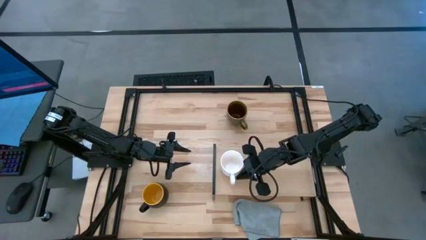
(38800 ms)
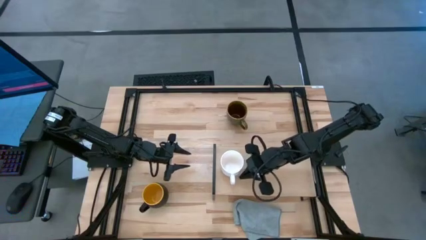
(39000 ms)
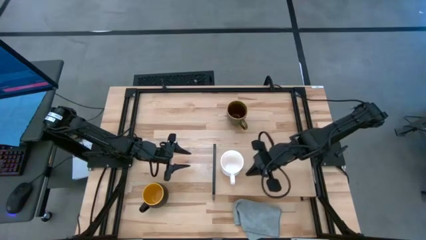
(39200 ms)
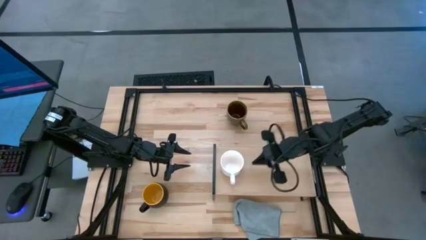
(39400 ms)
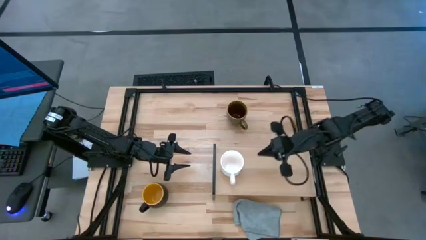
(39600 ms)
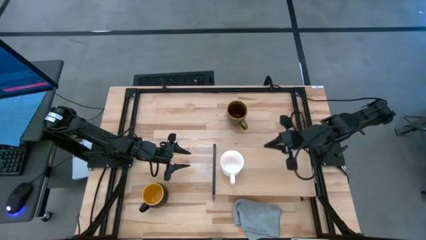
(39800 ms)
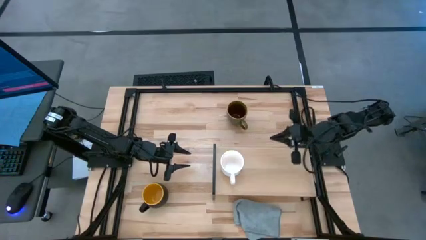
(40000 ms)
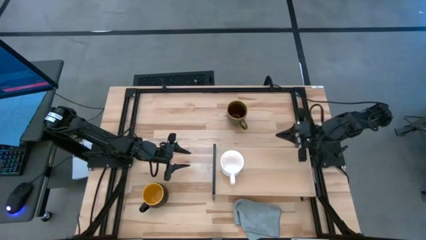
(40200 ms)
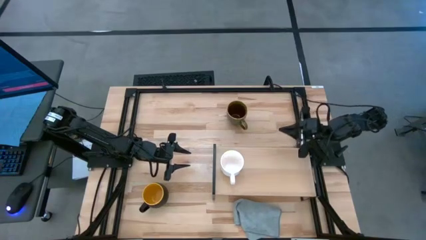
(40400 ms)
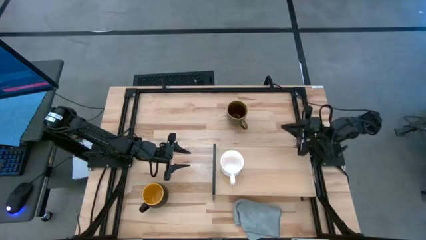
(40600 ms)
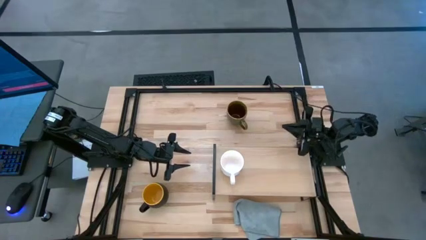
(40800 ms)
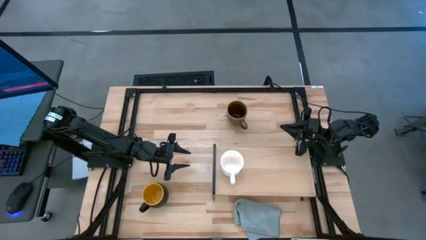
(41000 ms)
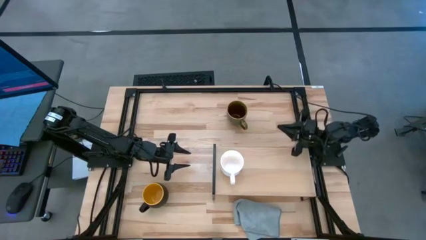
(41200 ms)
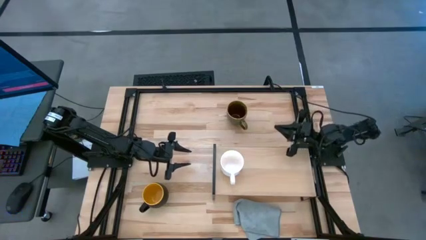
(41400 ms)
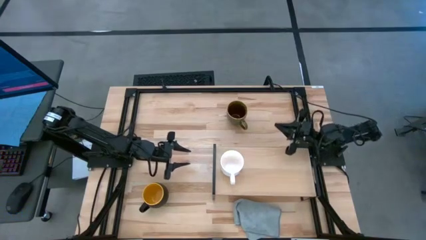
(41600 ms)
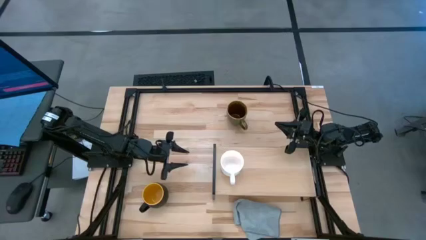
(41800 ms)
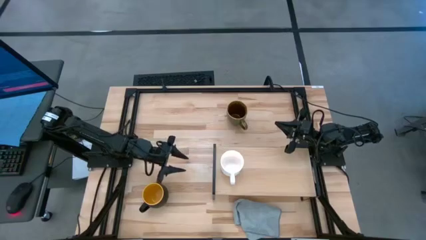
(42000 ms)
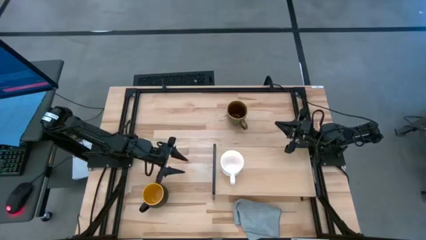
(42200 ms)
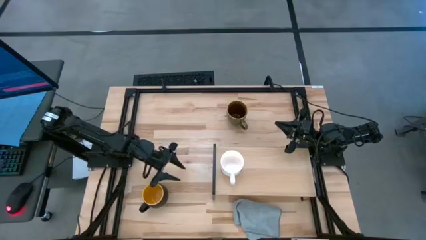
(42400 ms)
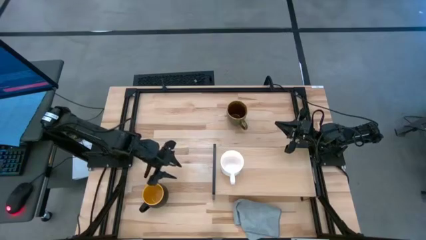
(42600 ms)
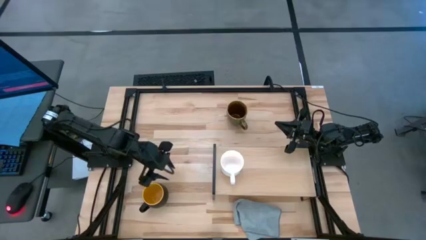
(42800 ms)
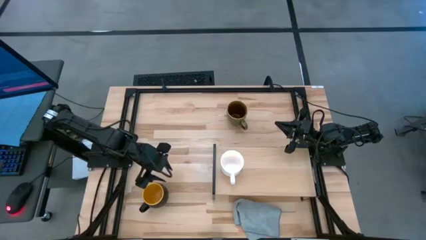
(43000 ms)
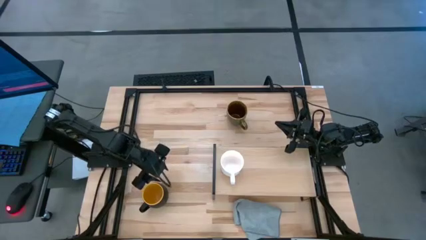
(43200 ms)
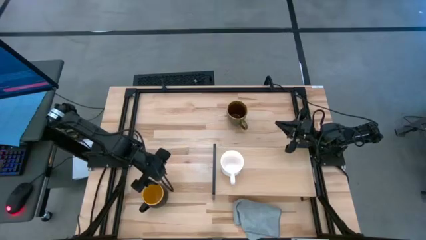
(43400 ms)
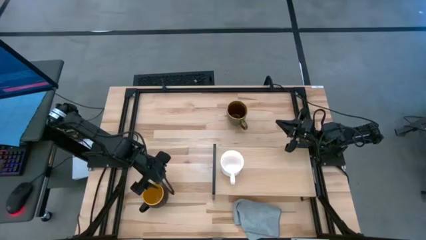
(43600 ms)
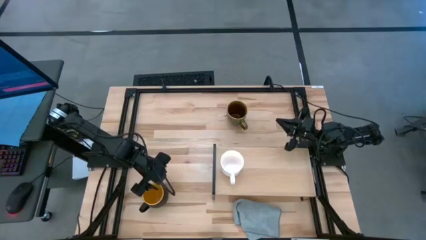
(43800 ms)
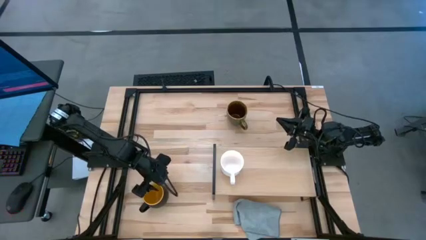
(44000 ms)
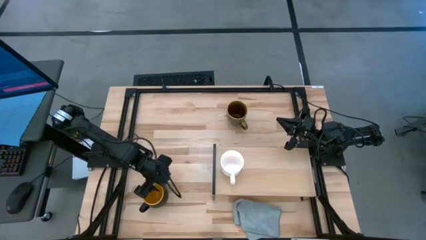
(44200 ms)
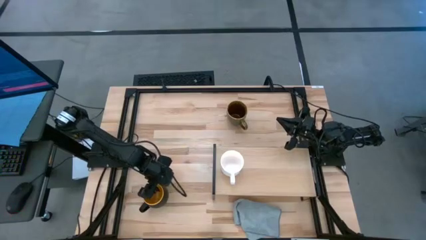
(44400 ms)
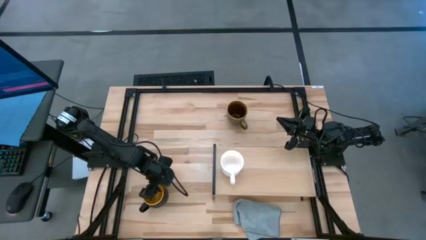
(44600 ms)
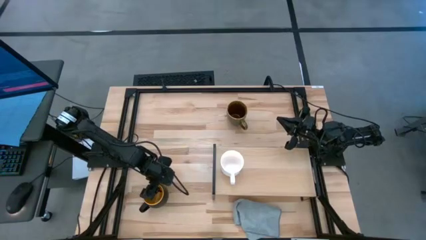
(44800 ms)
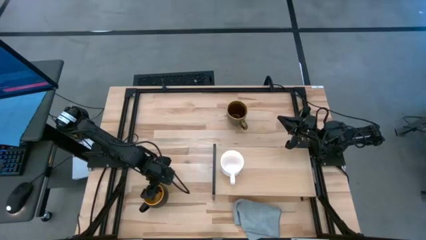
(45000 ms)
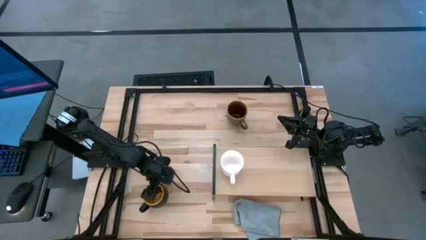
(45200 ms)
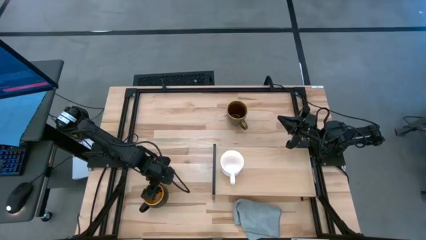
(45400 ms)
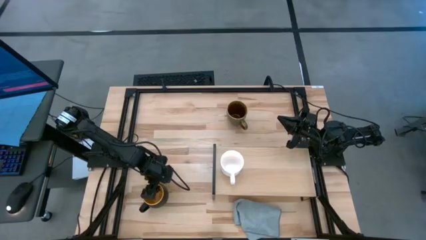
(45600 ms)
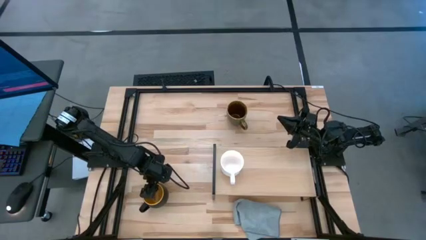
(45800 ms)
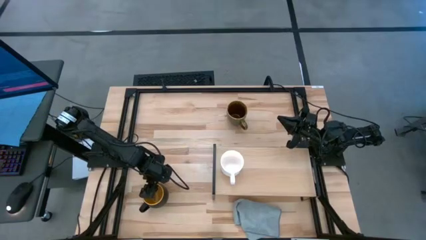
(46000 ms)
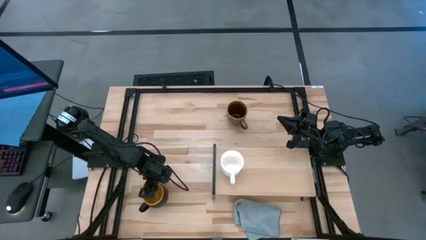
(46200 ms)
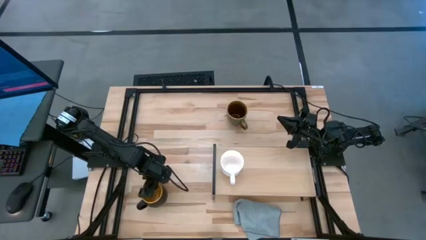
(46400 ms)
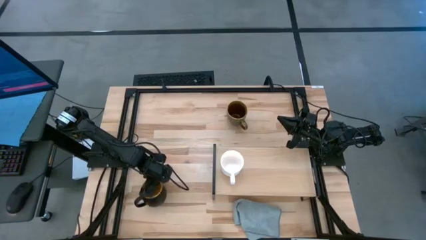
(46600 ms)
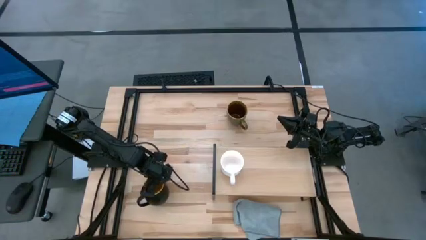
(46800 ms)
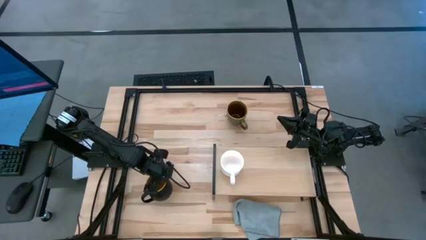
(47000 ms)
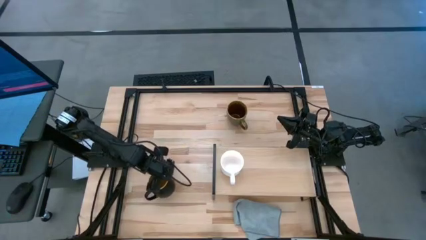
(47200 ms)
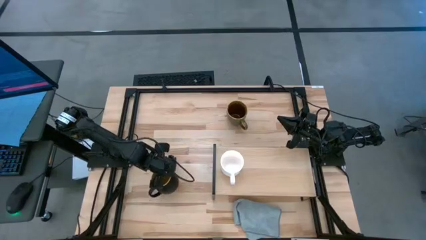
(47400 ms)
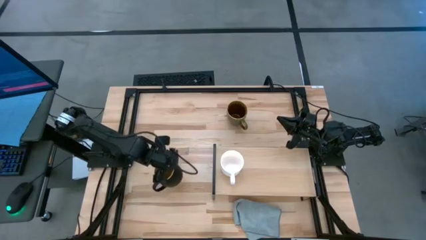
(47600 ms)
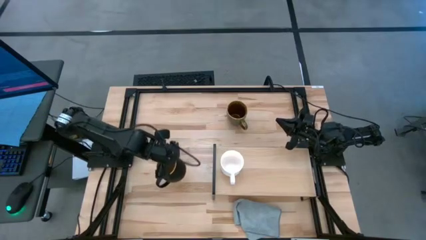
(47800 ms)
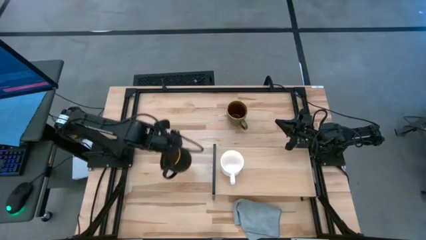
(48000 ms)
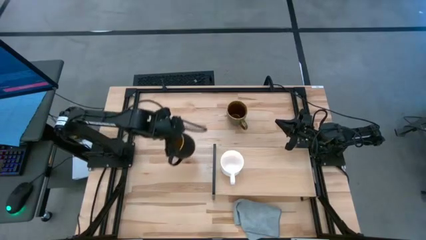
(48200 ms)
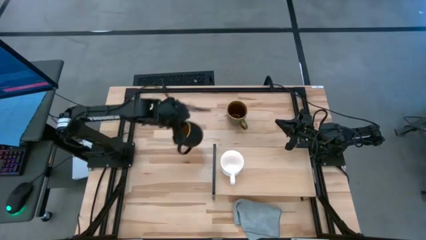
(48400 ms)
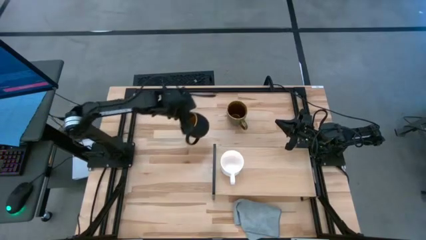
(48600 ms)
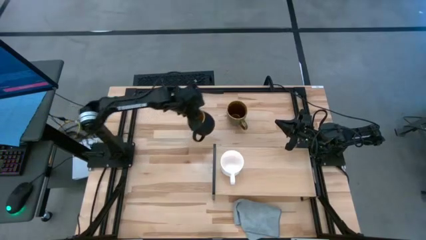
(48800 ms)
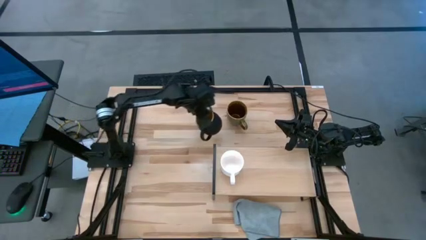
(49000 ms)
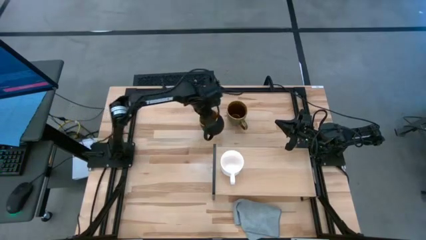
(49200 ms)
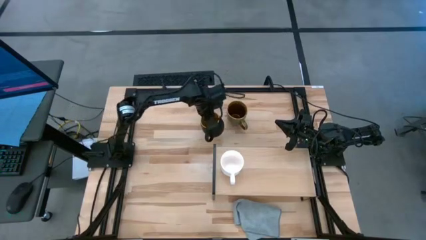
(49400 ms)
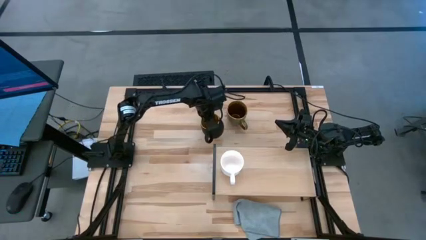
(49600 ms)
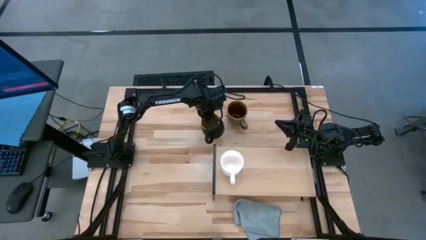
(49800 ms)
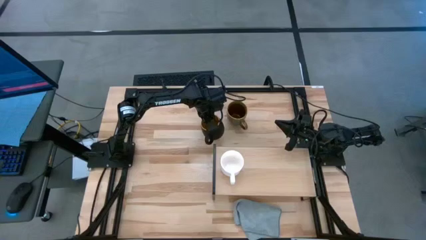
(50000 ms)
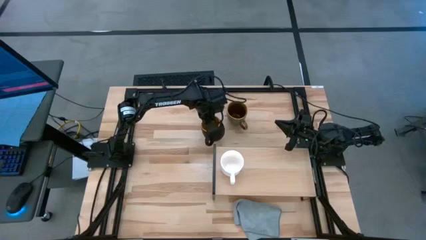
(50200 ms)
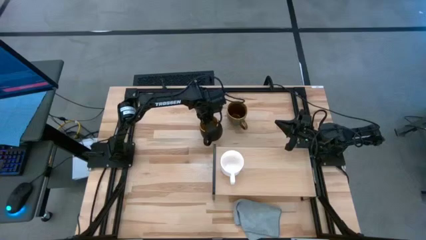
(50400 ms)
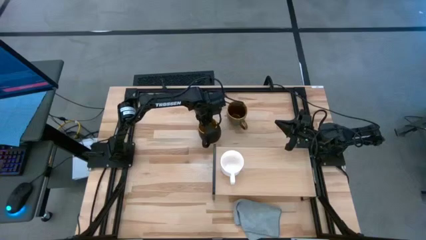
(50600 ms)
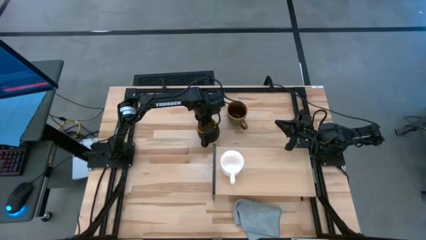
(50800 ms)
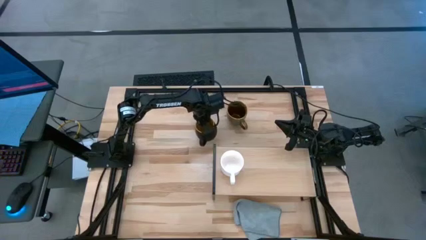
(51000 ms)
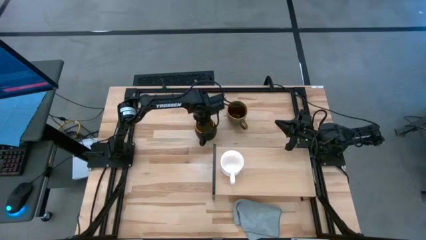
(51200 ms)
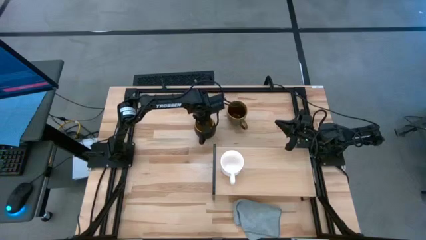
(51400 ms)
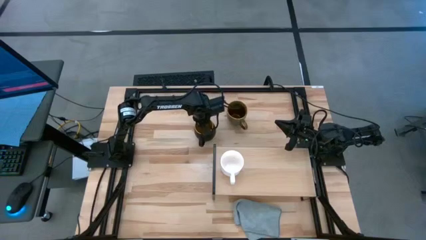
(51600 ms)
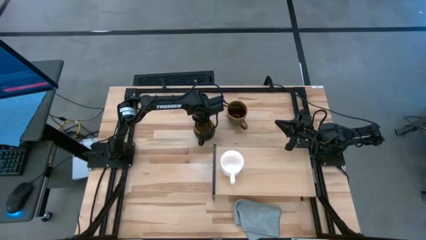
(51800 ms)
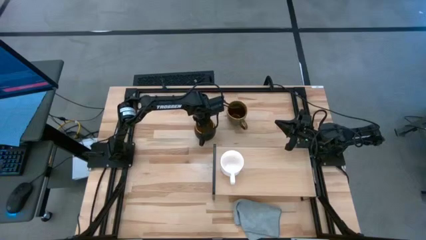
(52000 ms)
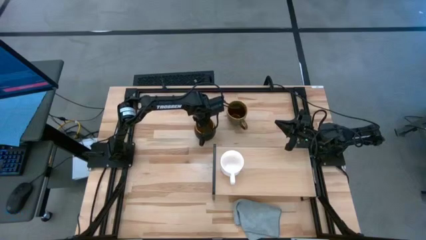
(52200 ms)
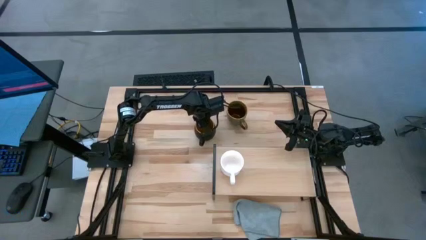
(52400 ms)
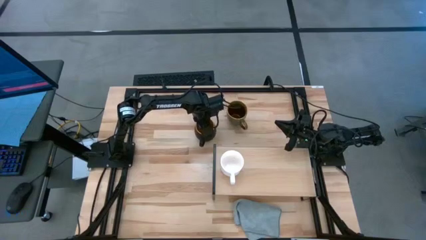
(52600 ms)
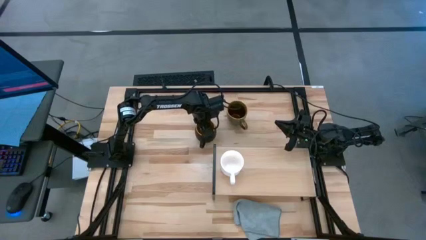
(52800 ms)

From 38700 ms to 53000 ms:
Task: Stack small to large cups/mugs on shelf
Put the black mug on the center of the table
